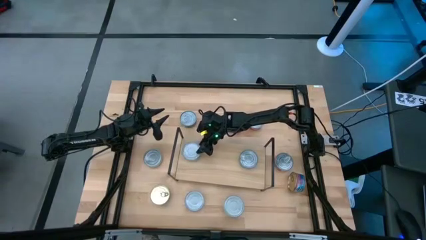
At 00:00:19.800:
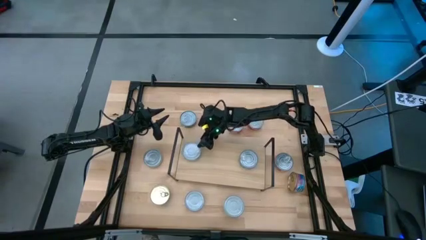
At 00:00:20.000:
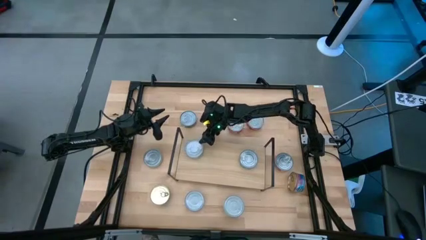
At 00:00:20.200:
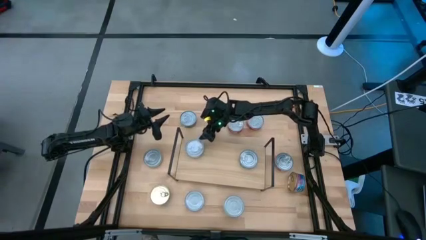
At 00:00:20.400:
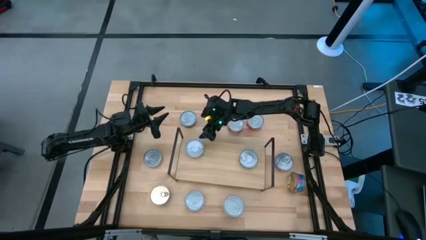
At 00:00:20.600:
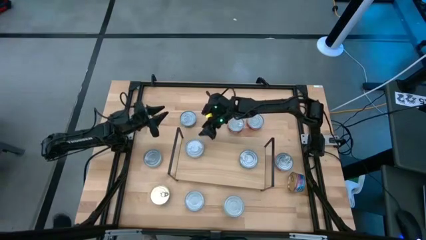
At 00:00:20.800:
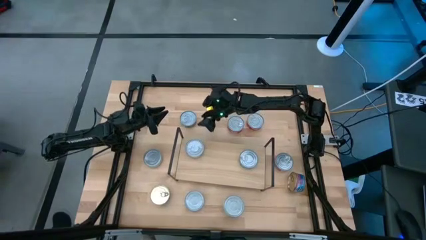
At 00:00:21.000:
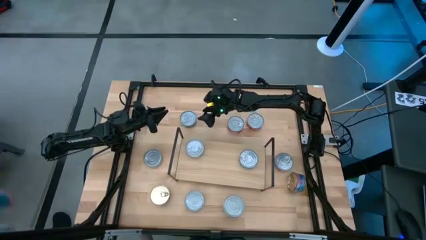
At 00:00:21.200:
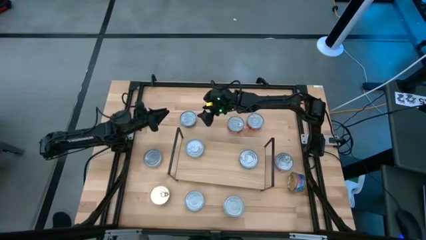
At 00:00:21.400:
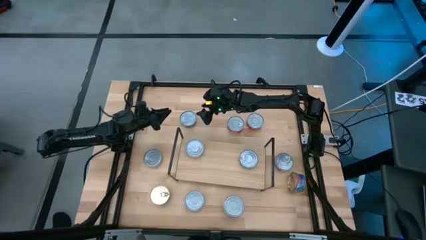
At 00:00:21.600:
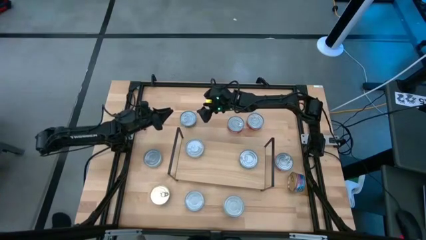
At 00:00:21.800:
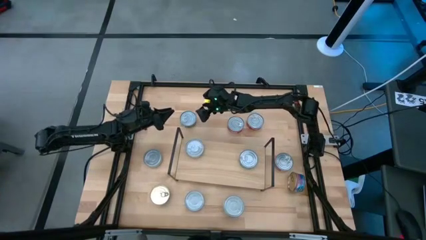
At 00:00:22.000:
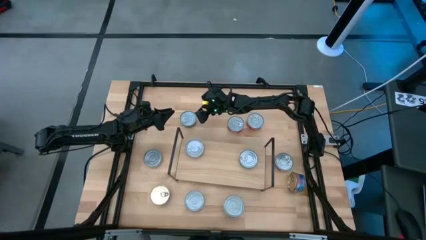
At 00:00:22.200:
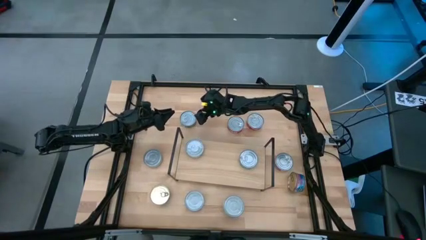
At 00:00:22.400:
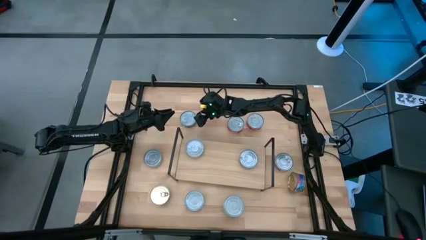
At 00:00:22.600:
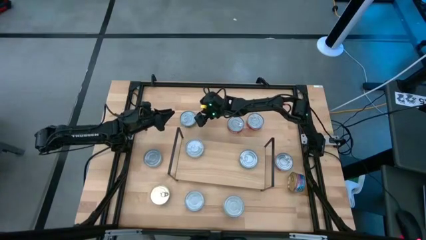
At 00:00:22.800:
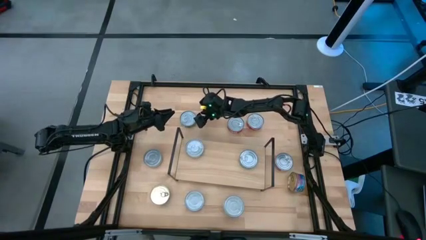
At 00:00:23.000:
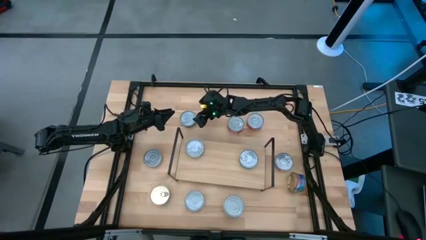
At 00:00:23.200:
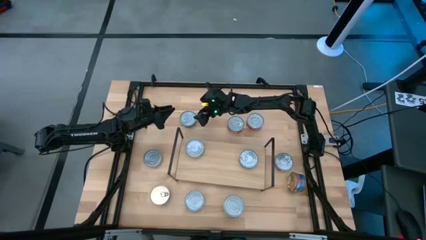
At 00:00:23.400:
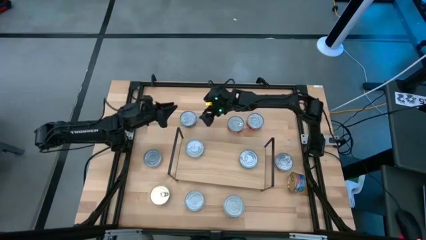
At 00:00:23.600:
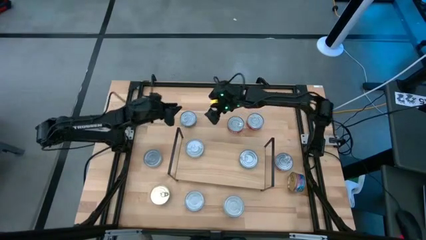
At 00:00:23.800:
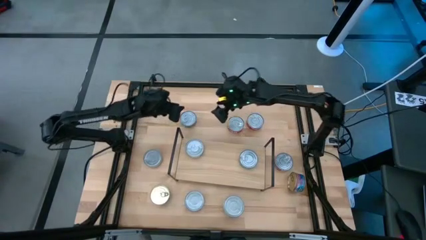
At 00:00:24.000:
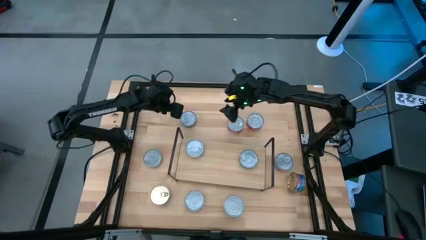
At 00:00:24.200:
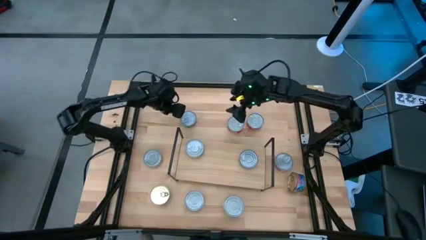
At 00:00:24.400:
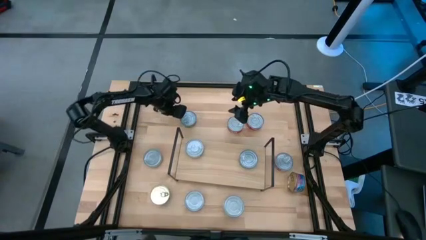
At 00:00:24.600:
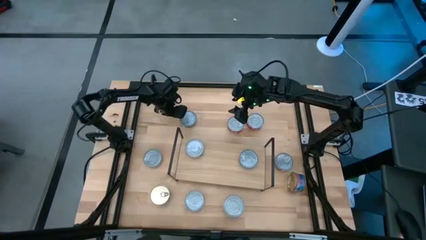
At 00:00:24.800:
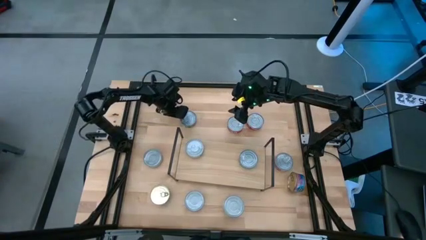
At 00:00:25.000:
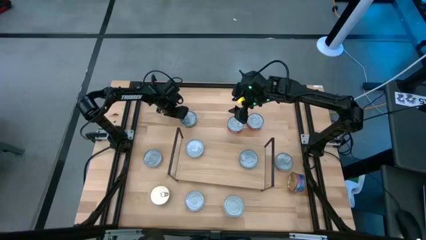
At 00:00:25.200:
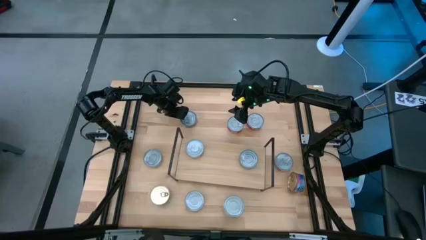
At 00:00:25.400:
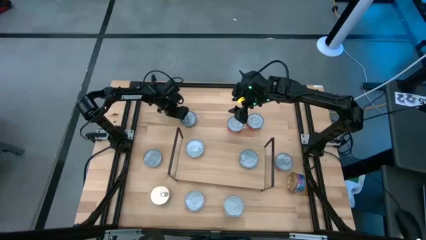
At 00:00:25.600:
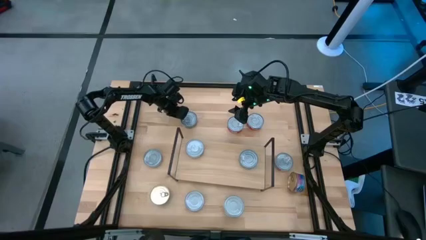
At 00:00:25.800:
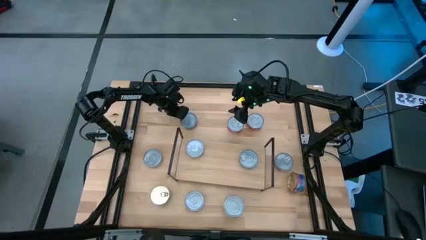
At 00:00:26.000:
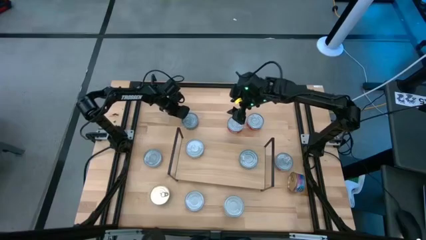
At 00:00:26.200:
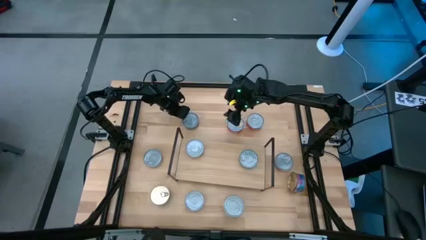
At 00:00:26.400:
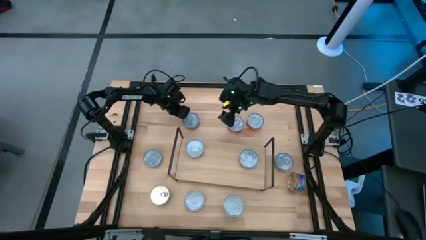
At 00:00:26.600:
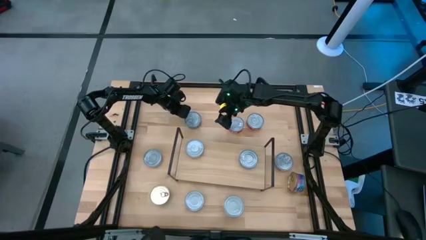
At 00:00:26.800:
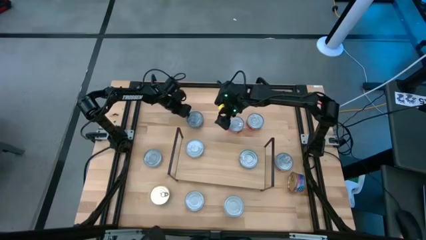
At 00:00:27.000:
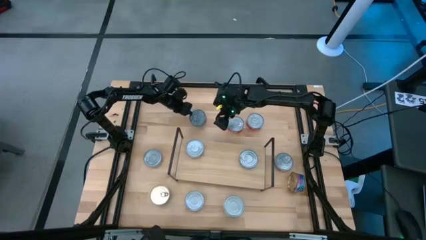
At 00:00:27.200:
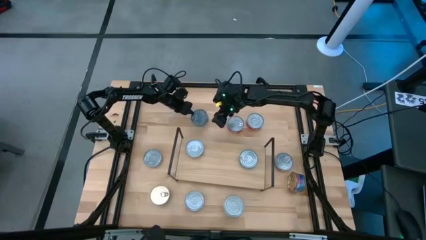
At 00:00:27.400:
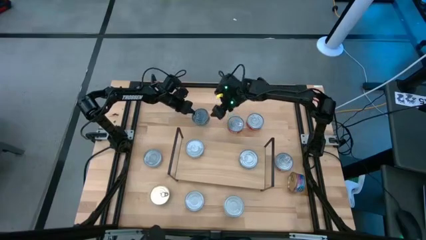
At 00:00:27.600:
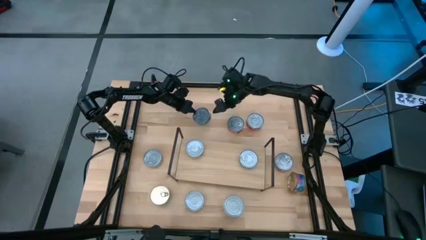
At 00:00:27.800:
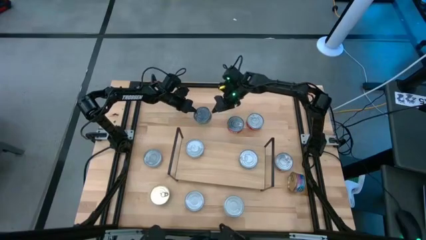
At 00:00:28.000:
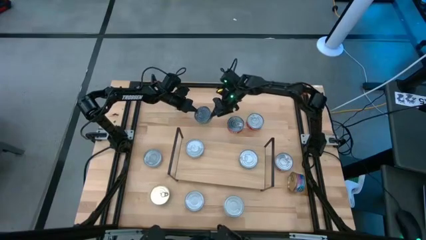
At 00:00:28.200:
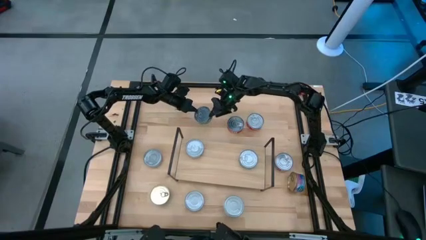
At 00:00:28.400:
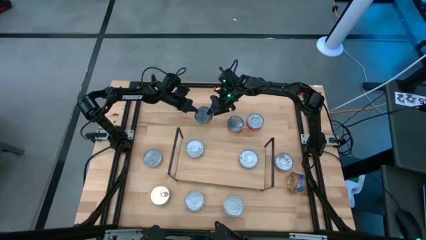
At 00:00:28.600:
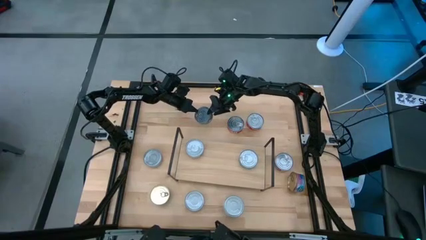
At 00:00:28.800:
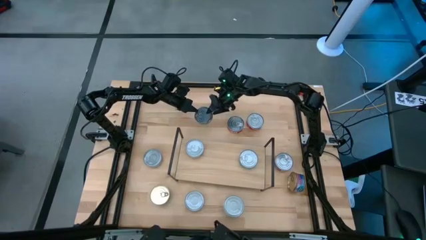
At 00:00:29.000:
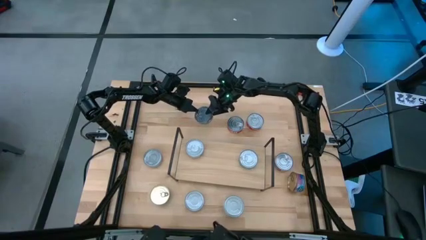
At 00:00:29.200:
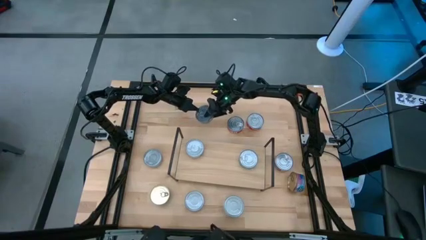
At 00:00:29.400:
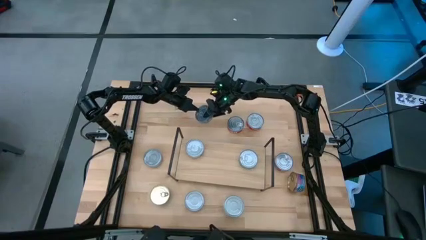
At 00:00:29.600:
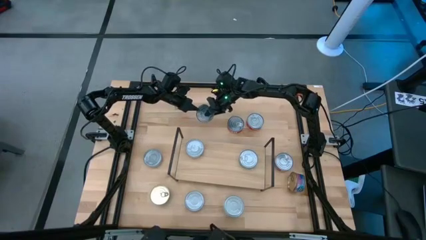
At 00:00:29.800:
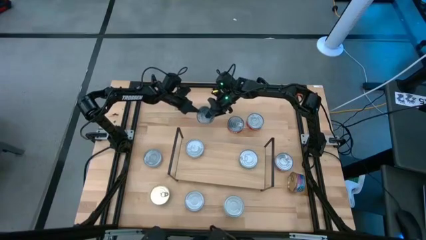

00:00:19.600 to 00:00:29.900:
Task: Stack canned seafood by type on shelf
Stack the green tuna can on top of the green tuna can on the shelf

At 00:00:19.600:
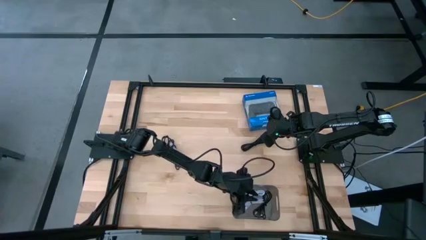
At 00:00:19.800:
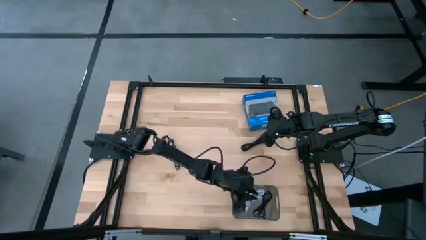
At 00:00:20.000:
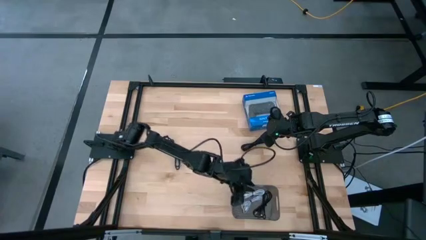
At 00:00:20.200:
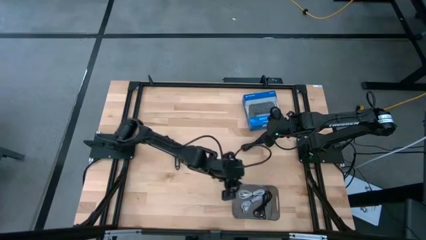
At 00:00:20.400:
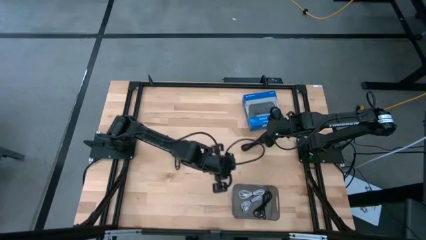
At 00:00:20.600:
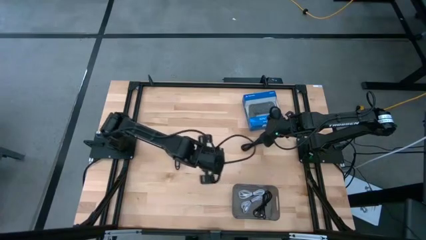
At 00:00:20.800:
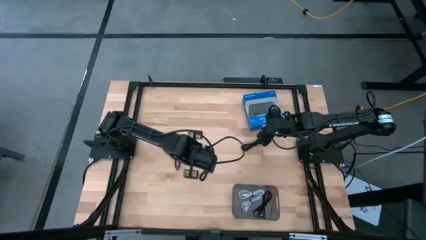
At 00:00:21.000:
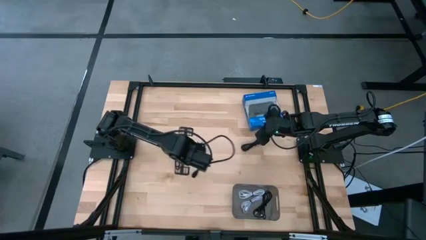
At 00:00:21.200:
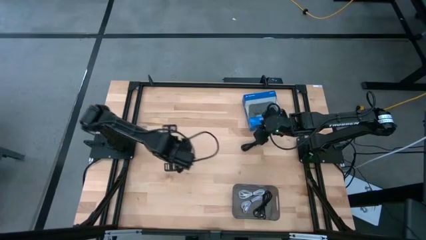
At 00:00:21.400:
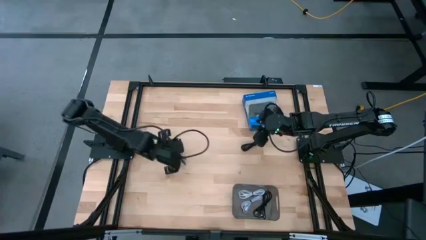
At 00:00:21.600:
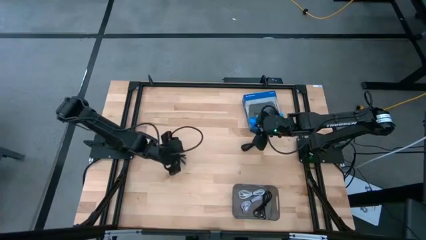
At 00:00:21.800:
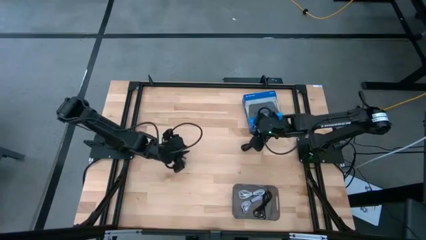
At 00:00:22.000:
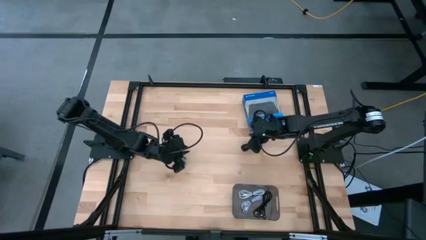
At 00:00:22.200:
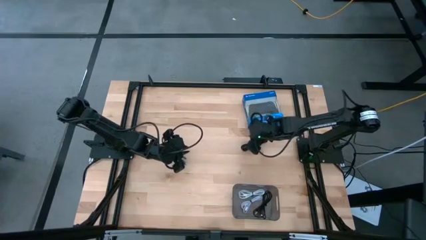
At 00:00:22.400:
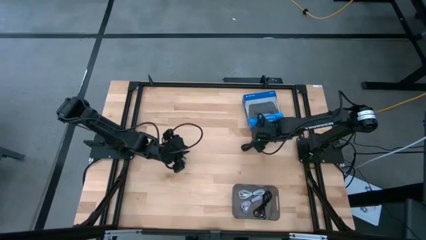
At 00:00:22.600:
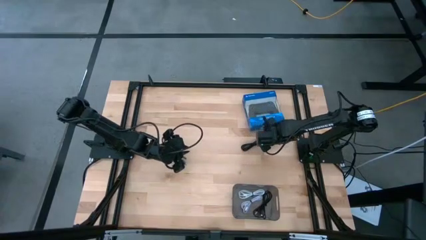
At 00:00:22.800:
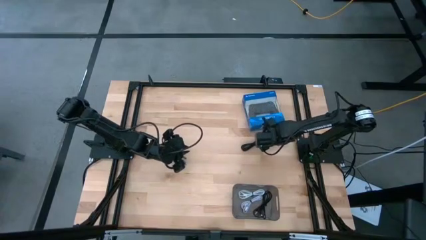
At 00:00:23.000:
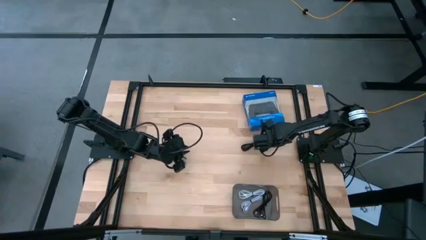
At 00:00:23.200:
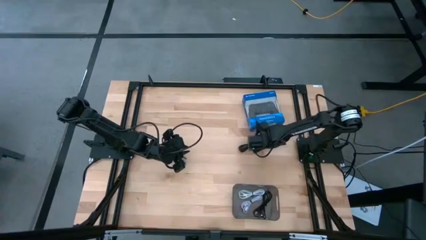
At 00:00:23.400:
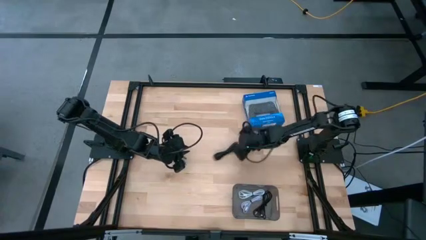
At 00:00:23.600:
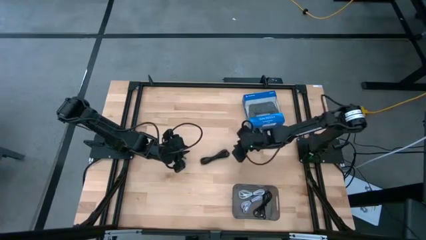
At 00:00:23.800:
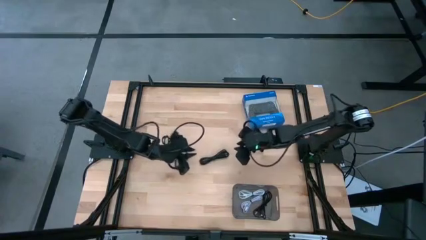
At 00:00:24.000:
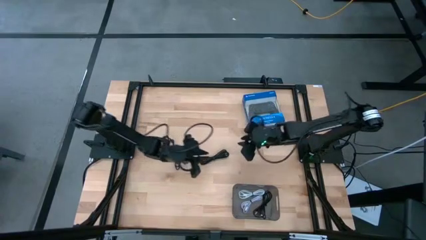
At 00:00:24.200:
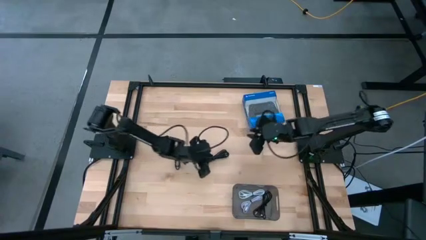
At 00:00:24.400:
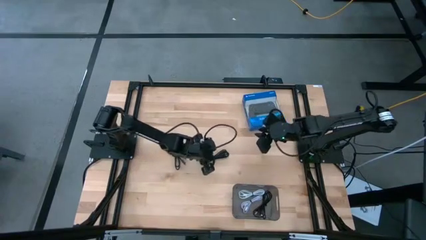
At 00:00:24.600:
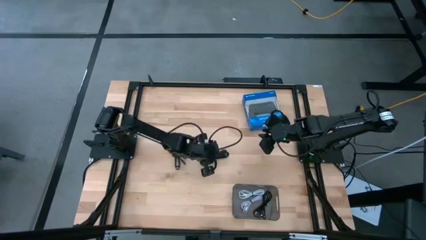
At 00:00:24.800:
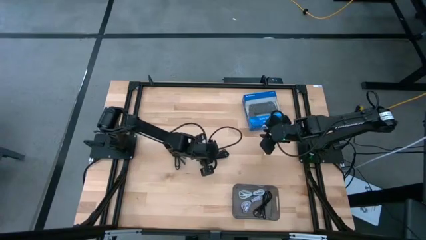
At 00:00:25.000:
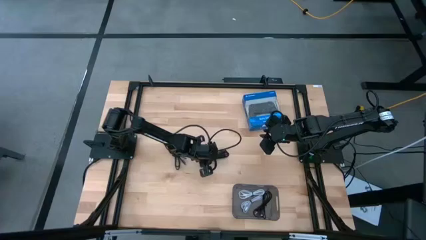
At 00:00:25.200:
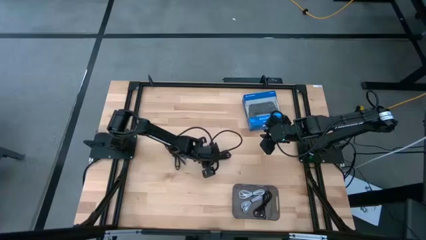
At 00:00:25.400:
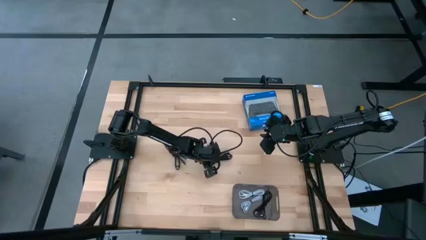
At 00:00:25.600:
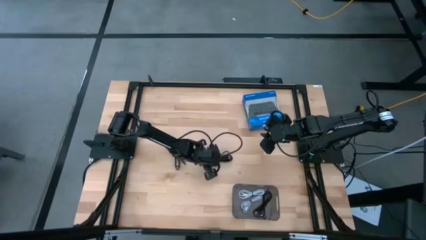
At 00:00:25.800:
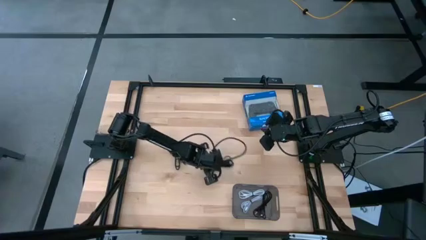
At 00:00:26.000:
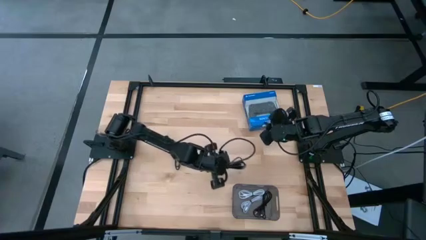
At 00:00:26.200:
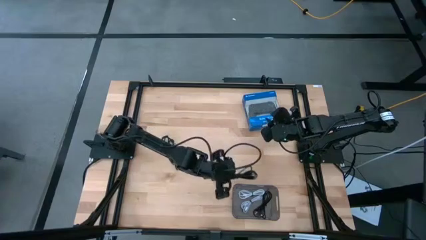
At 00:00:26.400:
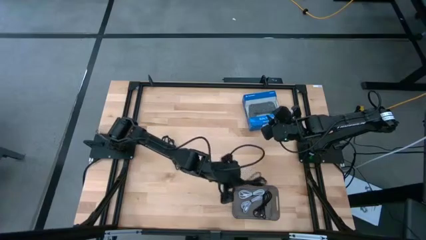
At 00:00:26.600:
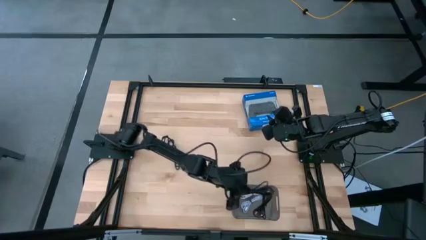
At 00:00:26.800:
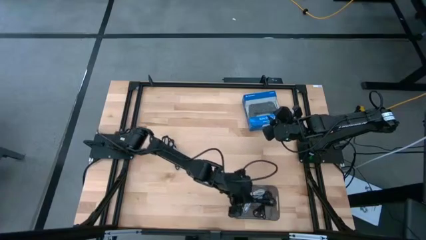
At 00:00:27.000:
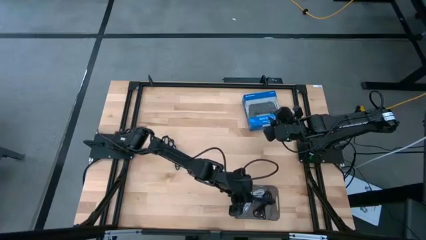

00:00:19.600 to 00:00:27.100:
Task: Pick and place USB-C Cables
Put the right black charger cable into the black bin
